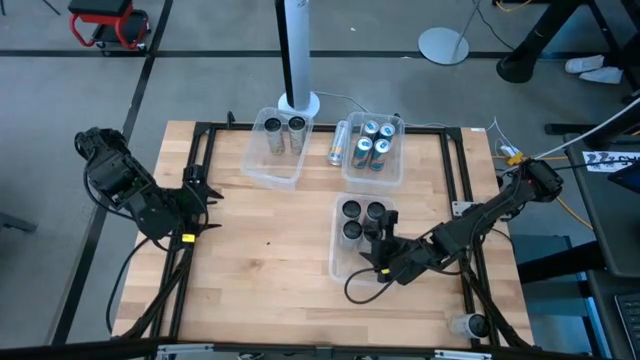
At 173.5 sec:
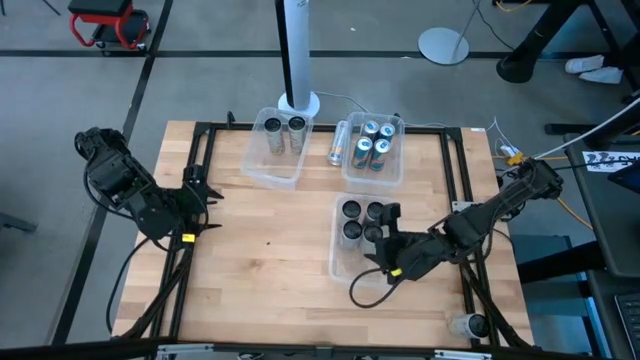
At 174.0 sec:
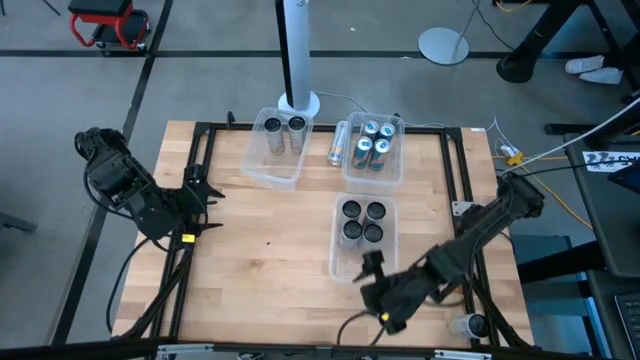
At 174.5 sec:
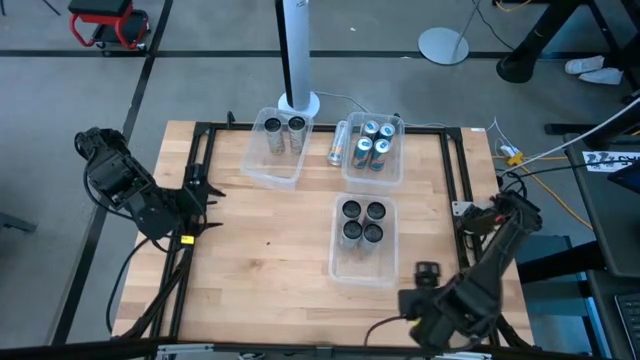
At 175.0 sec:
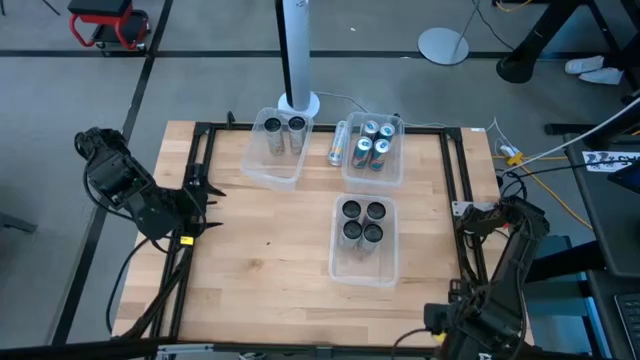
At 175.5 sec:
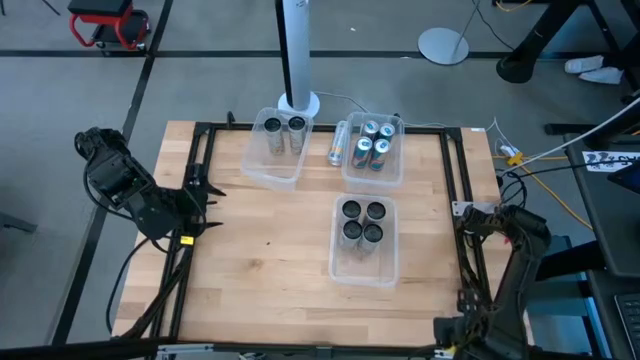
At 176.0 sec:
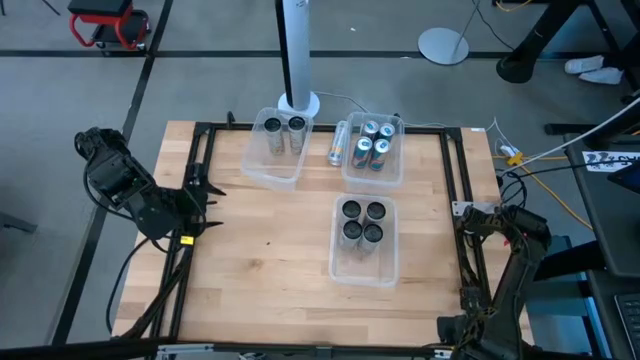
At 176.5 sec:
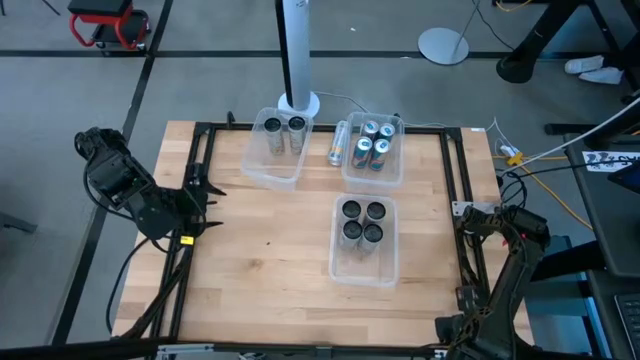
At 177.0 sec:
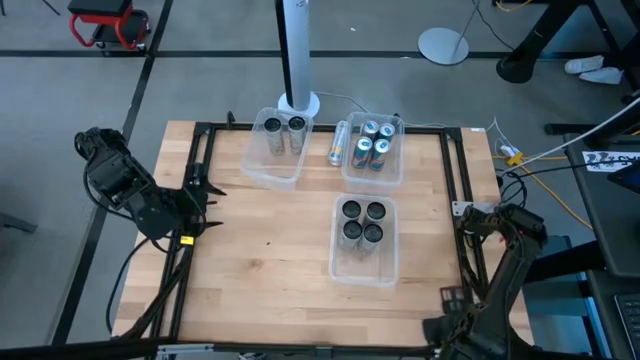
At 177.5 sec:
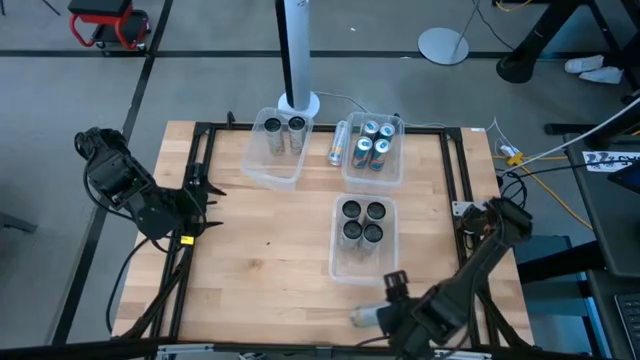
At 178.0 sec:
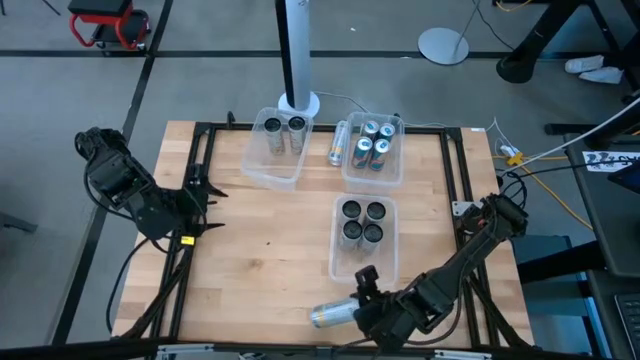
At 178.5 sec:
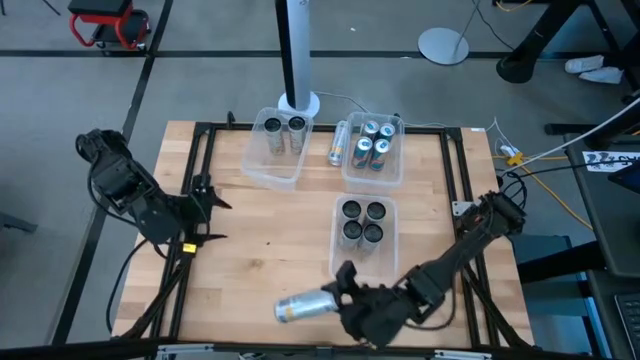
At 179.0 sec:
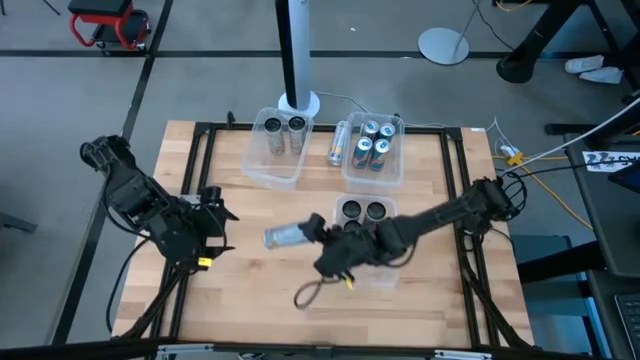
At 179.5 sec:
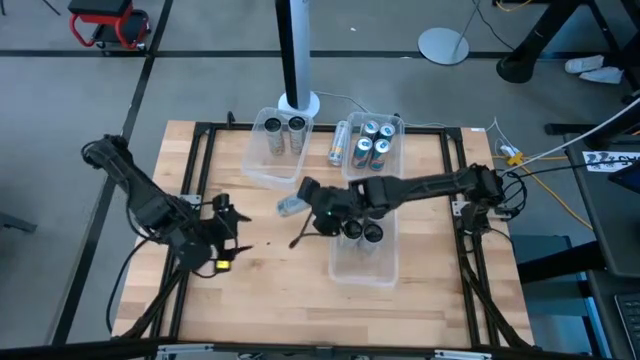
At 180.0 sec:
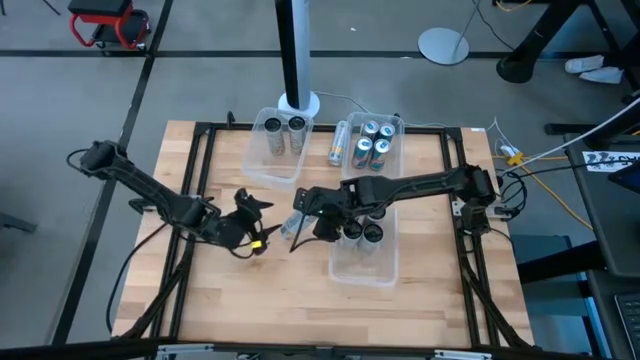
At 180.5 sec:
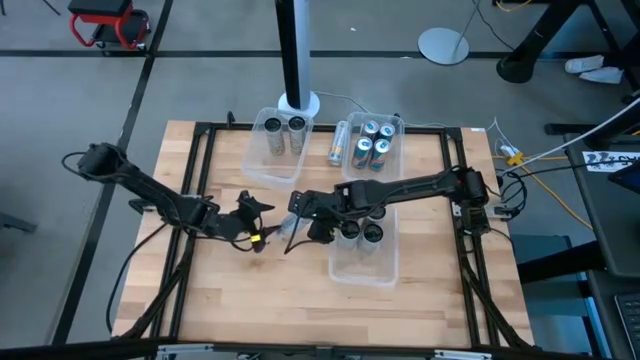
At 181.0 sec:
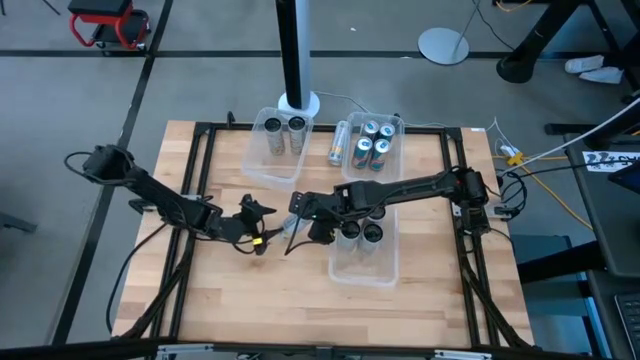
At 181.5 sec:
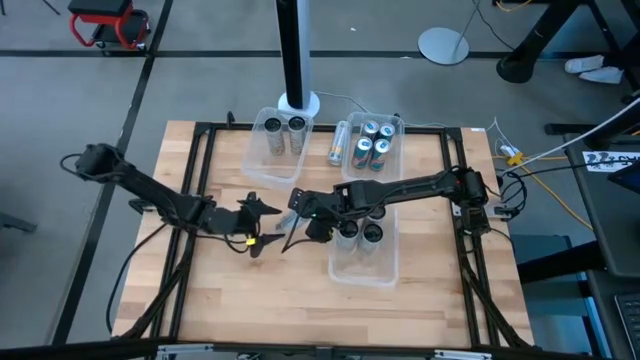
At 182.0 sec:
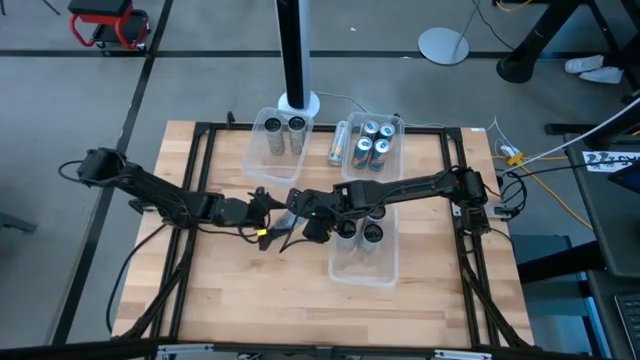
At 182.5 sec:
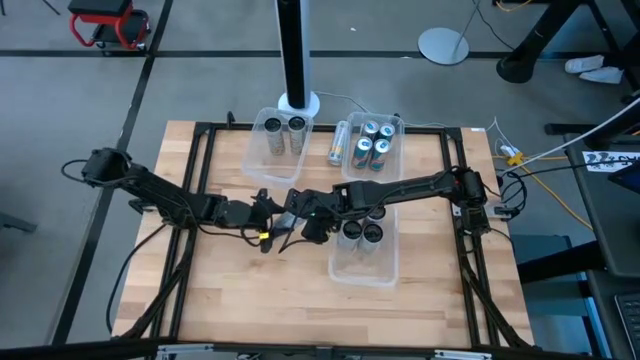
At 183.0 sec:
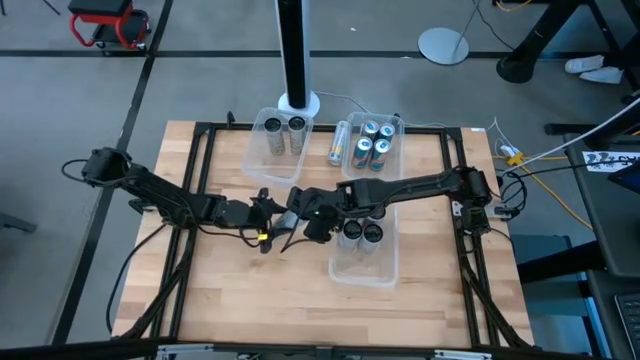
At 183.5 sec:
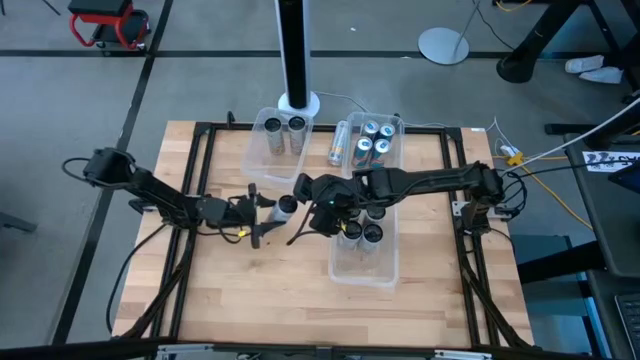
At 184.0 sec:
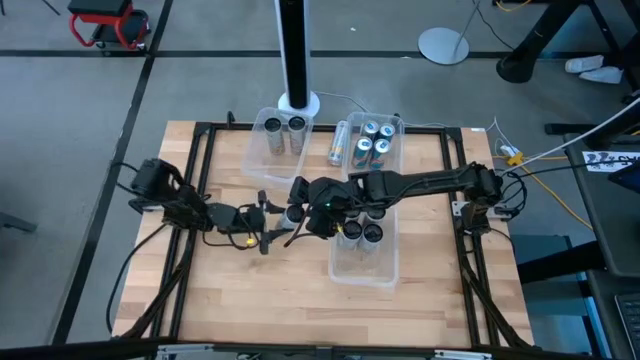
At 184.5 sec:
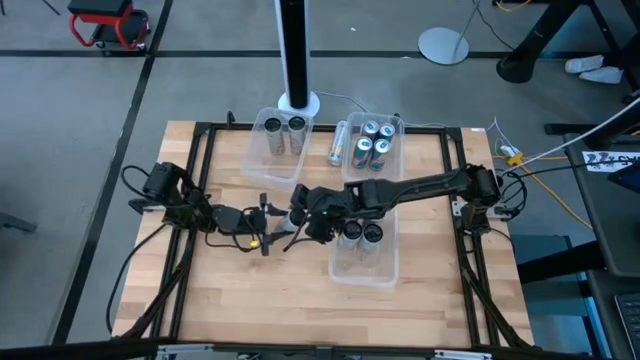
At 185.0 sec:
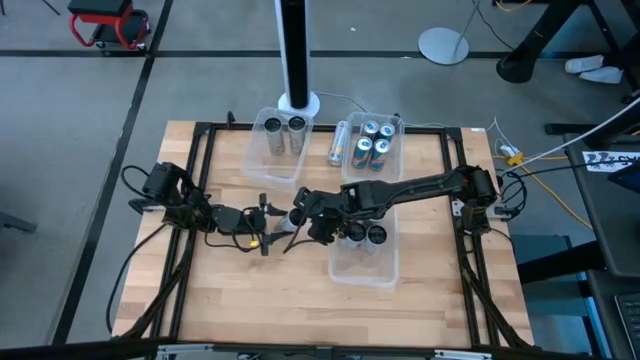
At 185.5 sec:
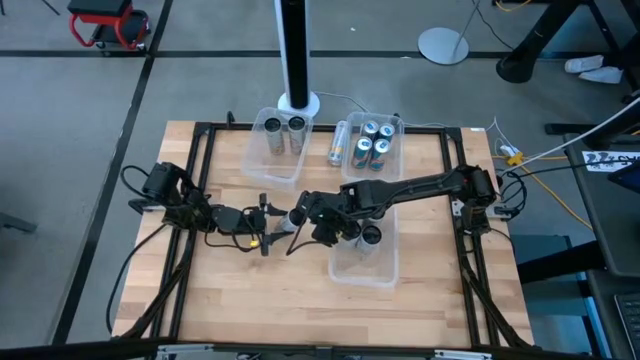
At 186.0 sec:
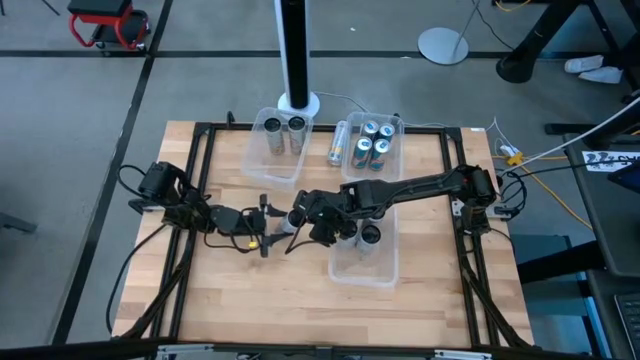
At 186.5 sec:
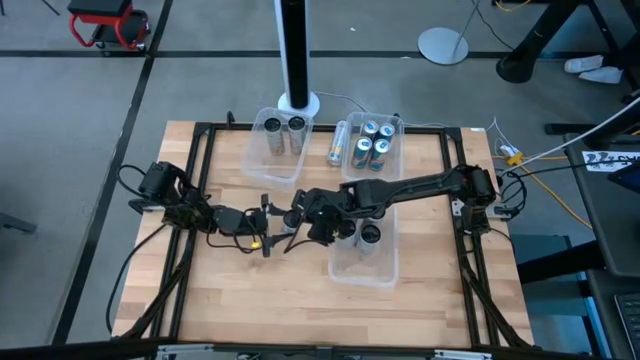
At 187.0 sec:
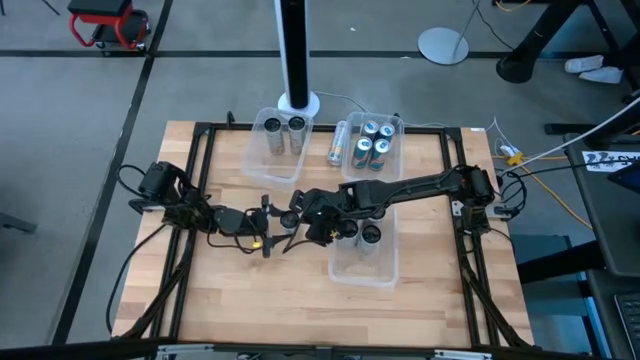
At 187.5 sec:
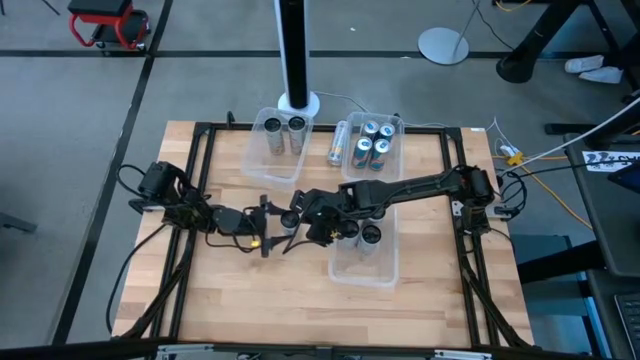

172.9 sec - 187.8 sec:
Task: Sort soda cans
Move the white yellow soda can to the center of the table

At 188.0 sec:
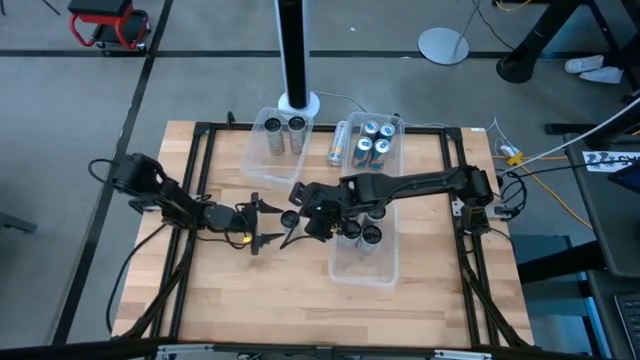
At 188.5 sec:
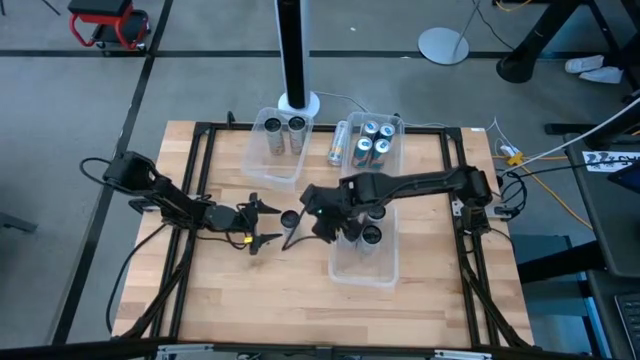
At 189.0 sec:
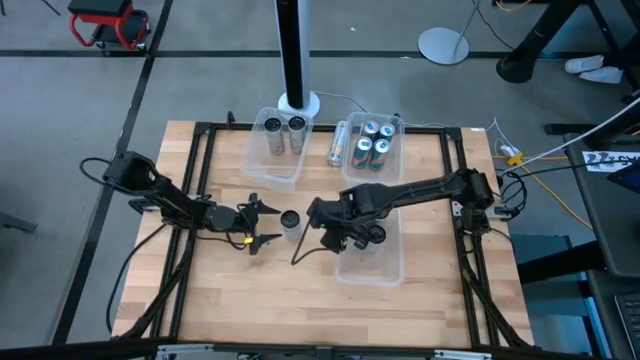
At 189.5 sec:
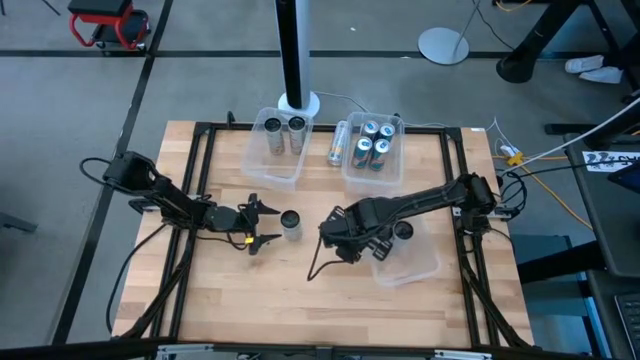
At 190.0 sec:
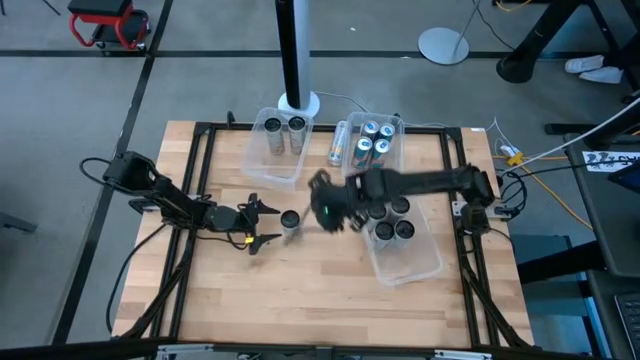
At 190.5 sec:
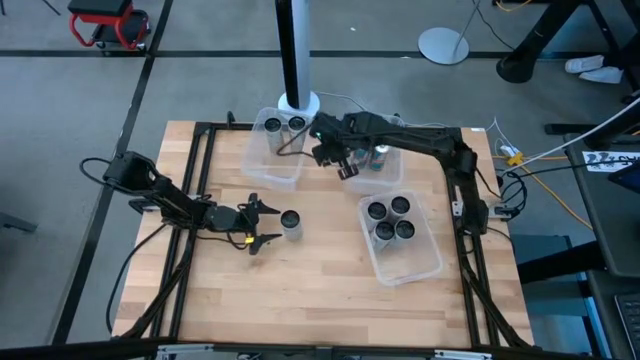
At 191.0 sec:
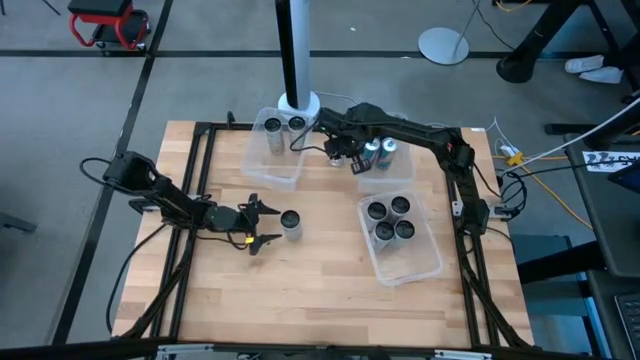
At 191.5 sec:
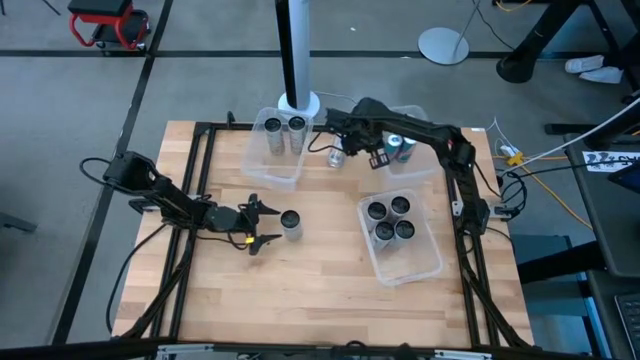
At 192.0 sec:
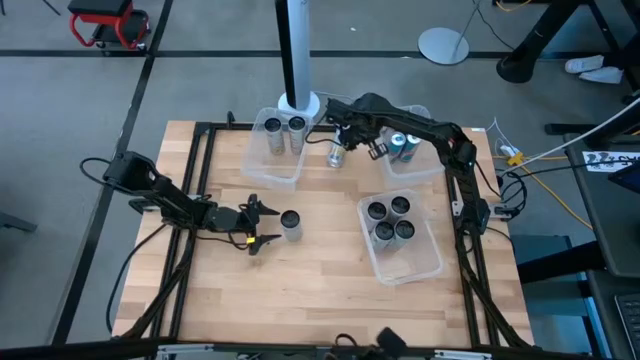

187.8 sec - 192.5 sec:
Adjust the transparent bins

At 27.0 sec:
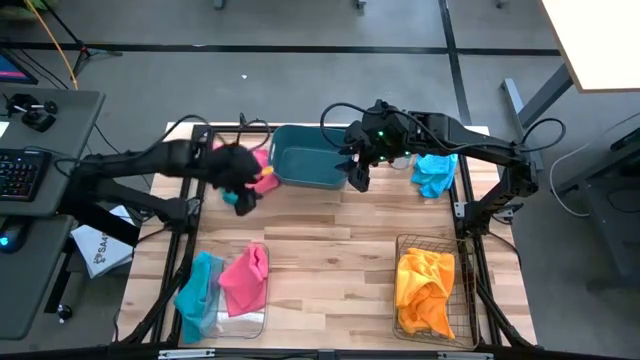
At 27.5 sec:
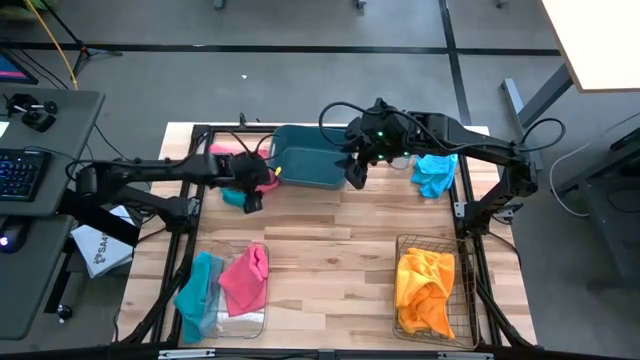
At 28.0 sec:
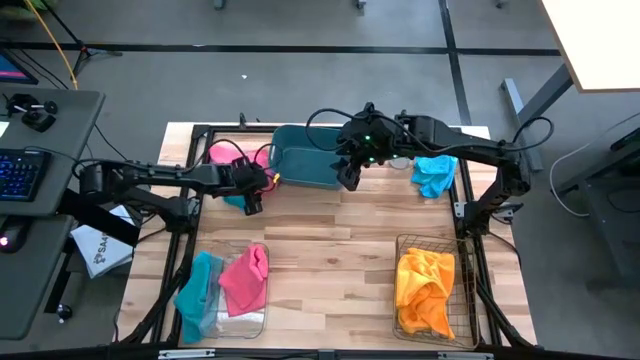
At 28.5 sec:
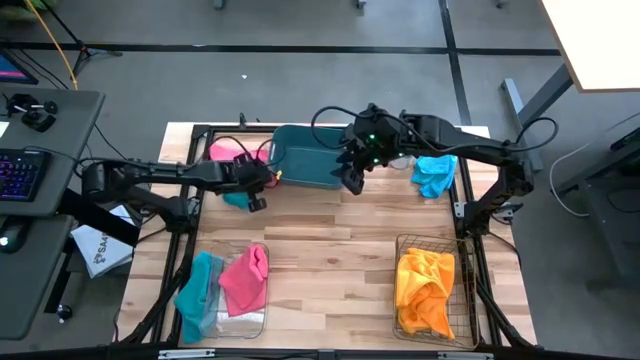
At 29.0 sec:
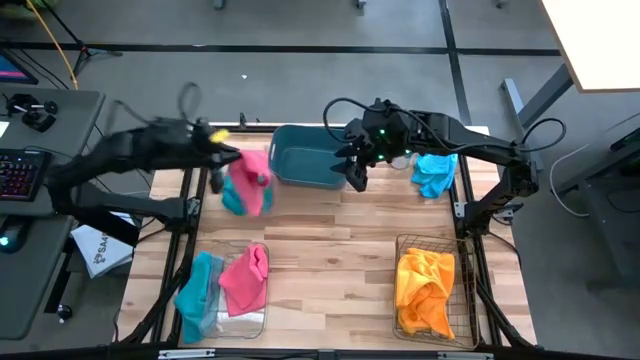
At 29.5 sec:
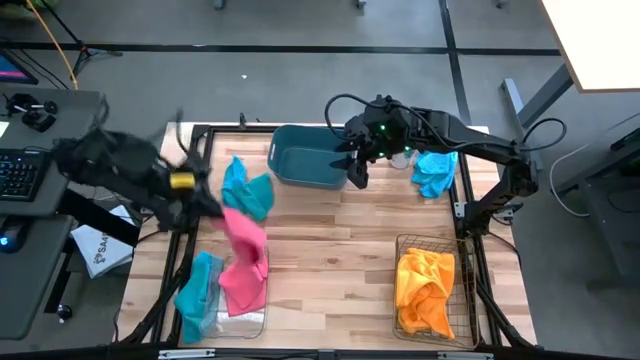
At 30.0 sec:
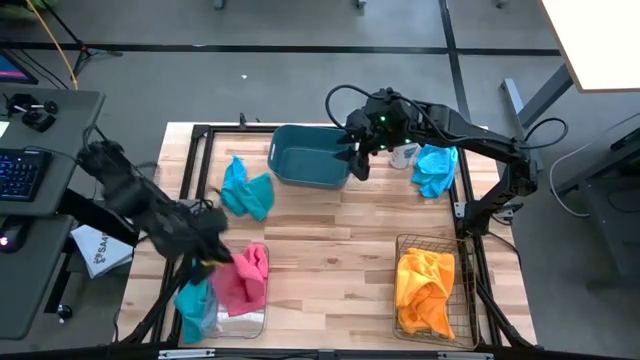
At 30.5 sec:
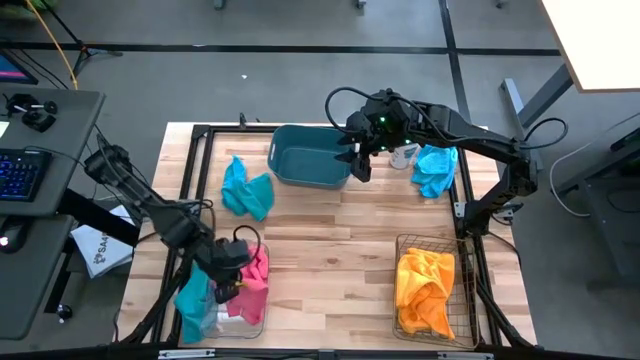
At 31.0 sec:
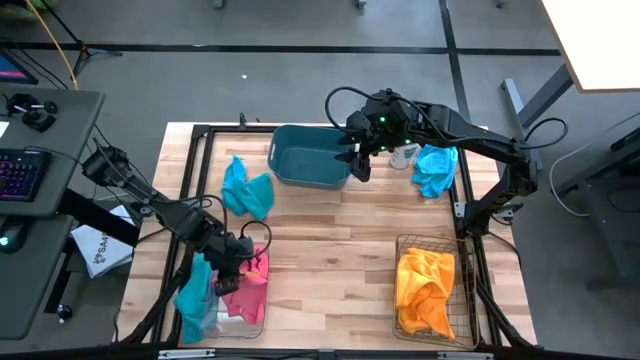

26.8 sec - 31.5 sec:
Task: Sort microfiber towel by color & place in baskets
Put the pink microfiber towel into the transparent bin
